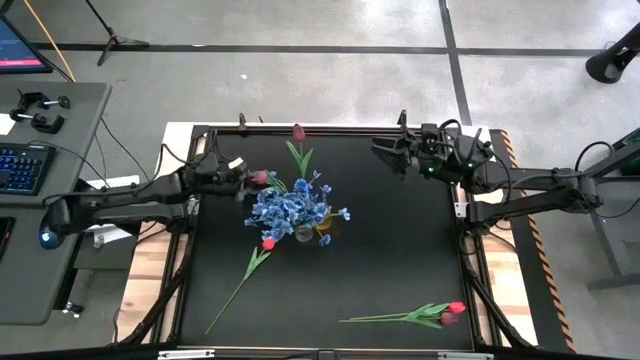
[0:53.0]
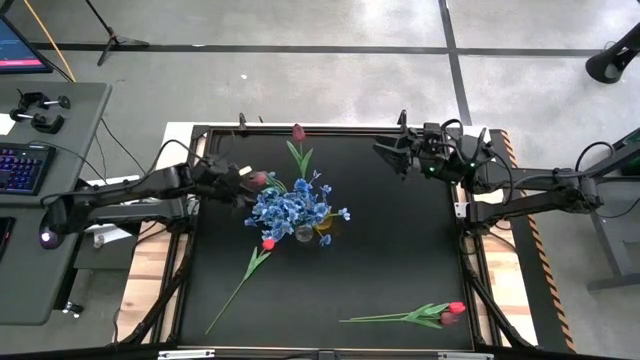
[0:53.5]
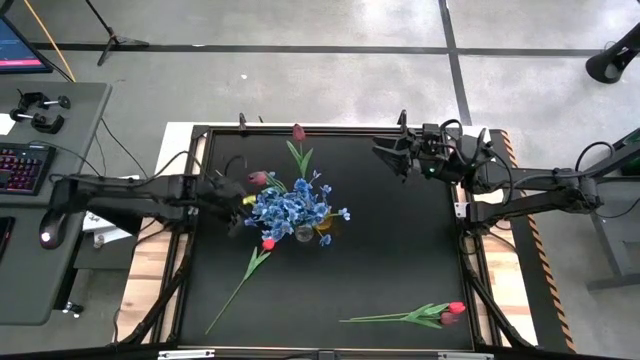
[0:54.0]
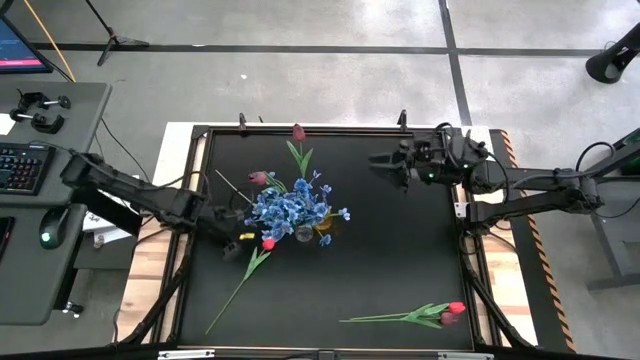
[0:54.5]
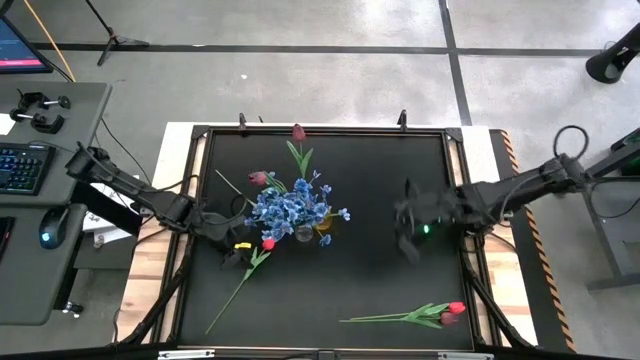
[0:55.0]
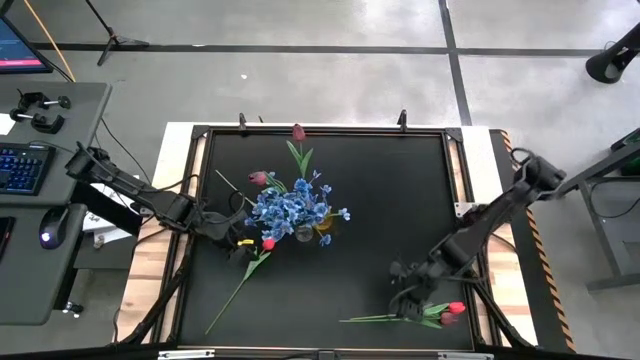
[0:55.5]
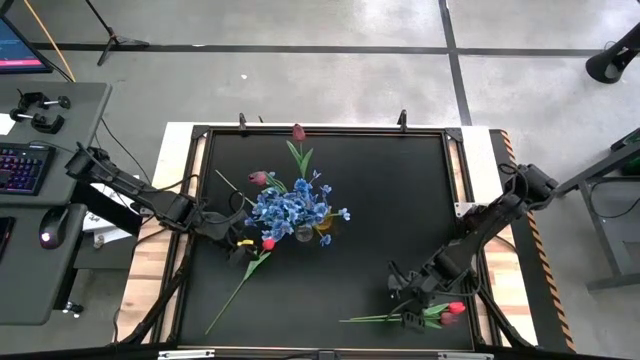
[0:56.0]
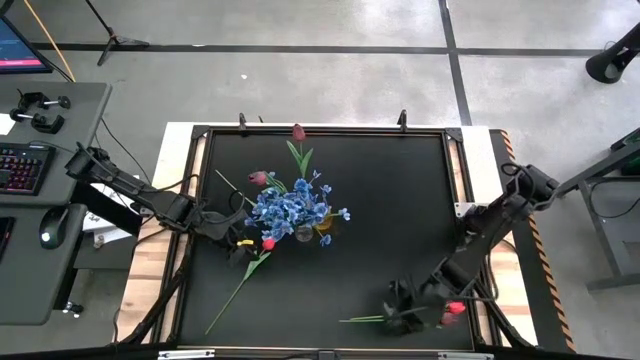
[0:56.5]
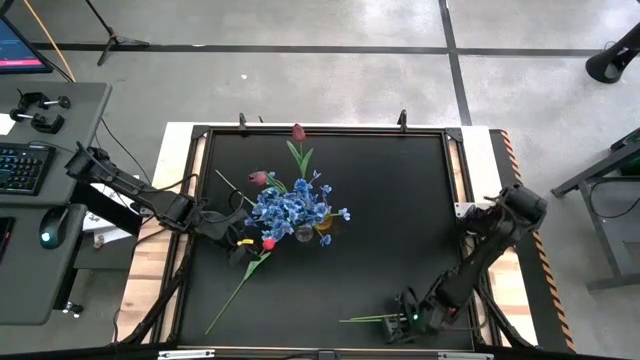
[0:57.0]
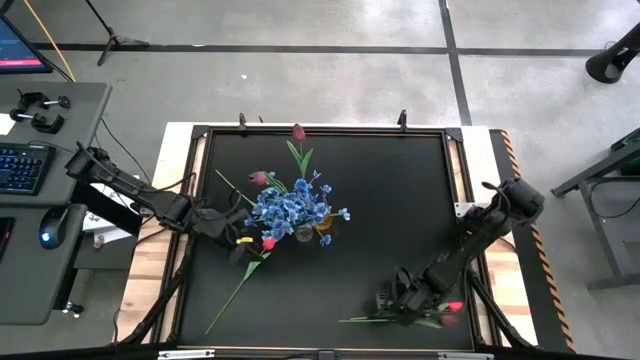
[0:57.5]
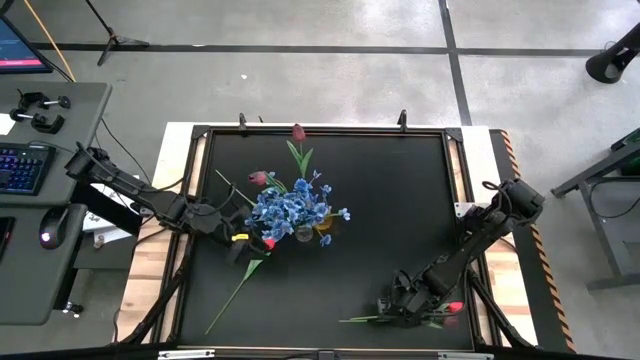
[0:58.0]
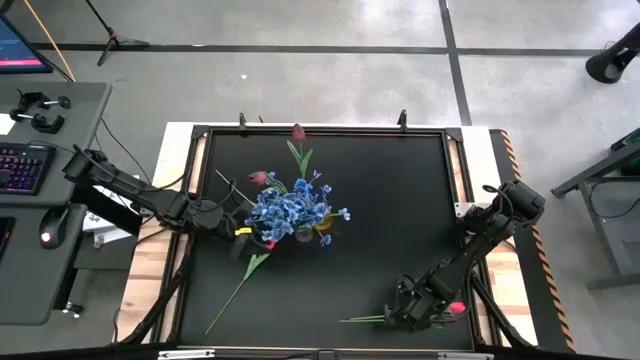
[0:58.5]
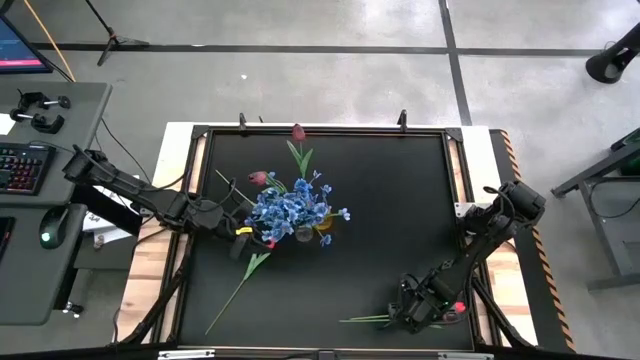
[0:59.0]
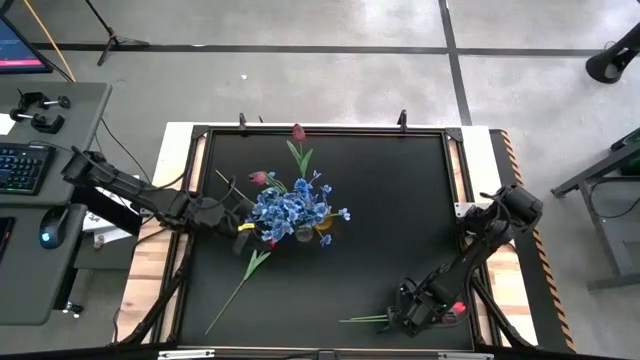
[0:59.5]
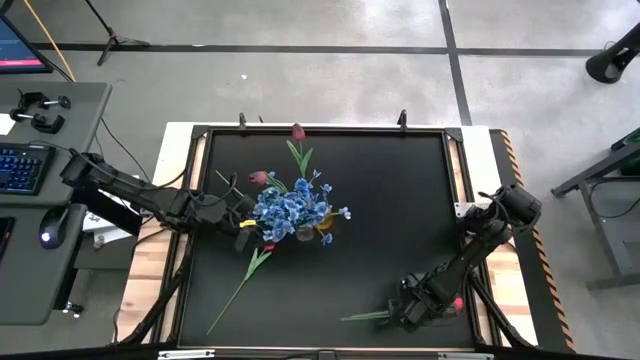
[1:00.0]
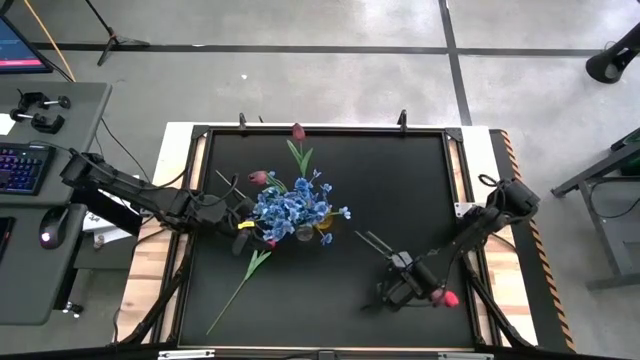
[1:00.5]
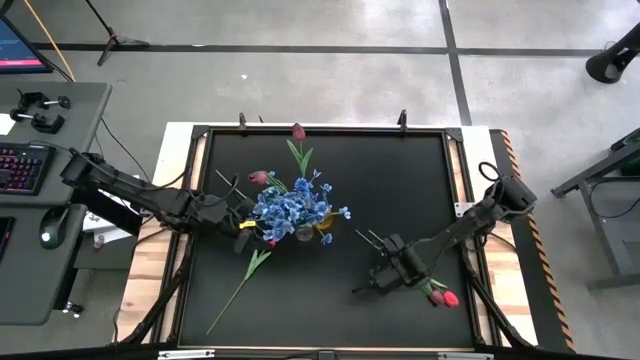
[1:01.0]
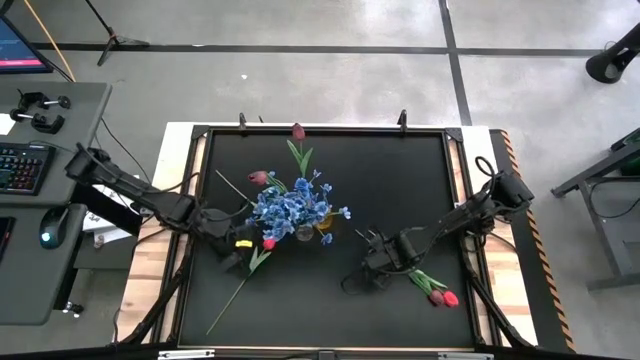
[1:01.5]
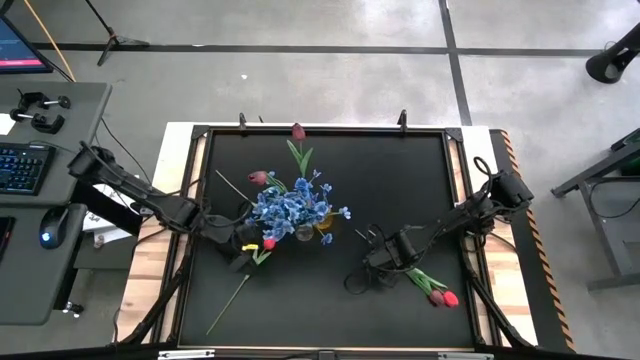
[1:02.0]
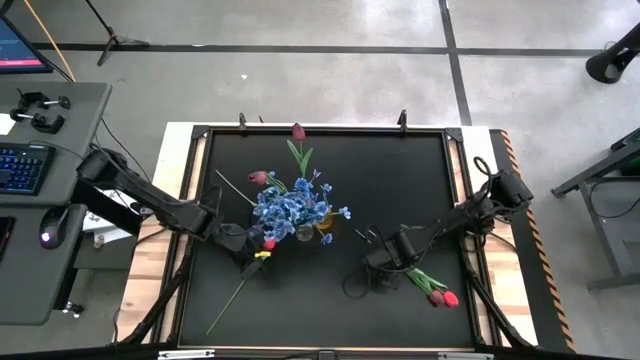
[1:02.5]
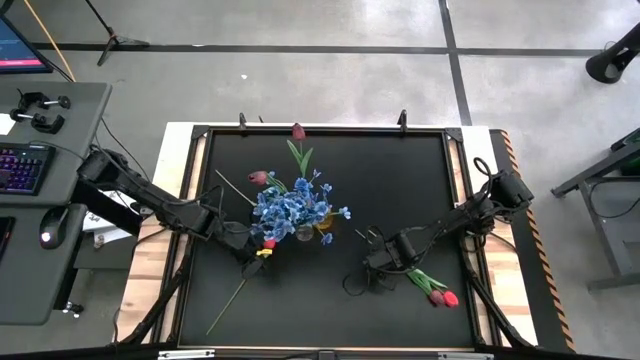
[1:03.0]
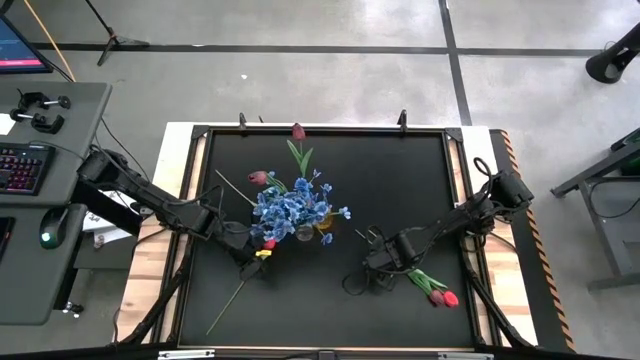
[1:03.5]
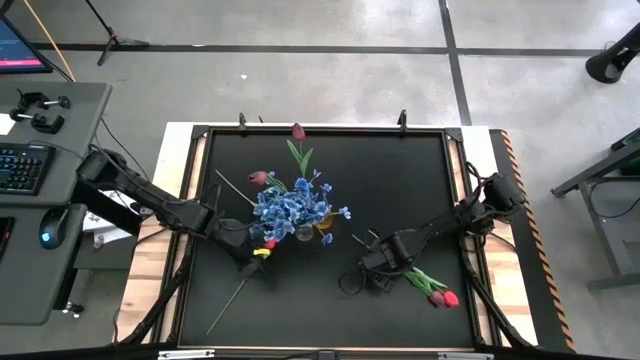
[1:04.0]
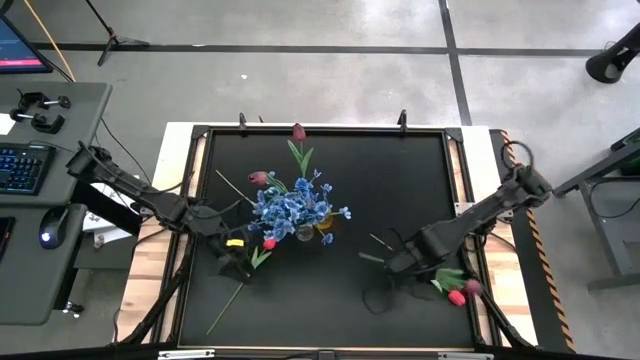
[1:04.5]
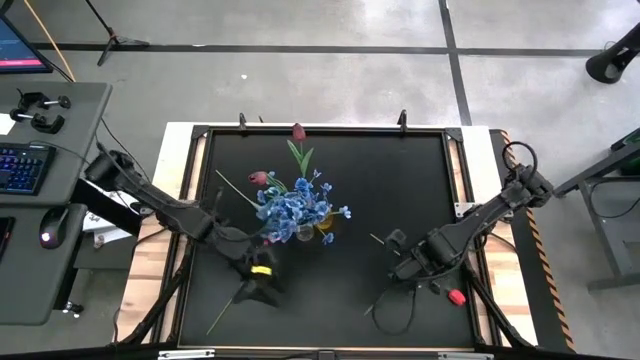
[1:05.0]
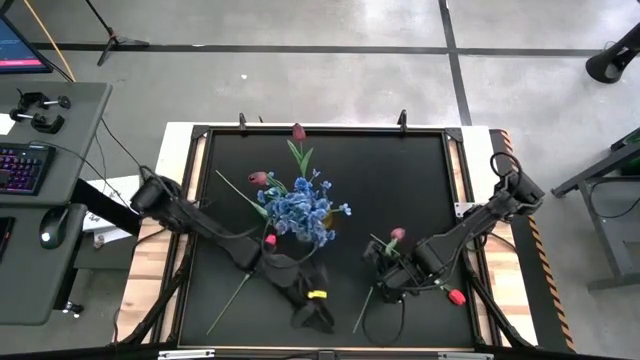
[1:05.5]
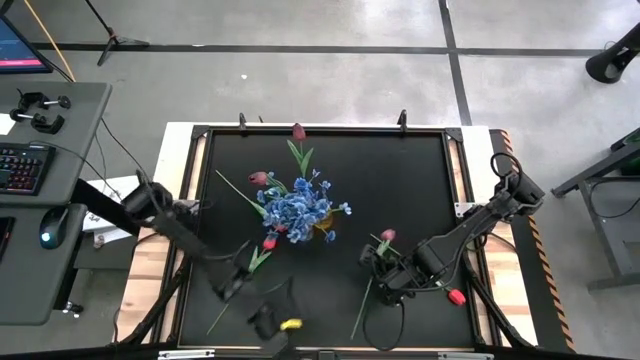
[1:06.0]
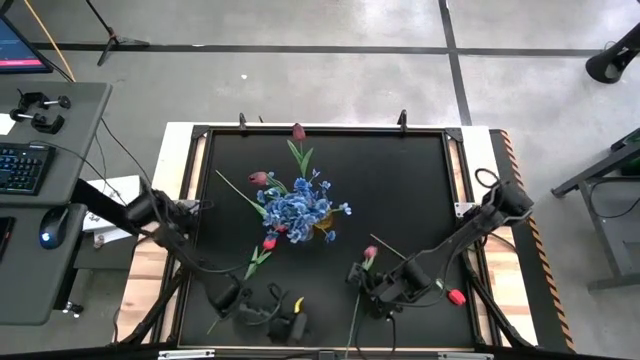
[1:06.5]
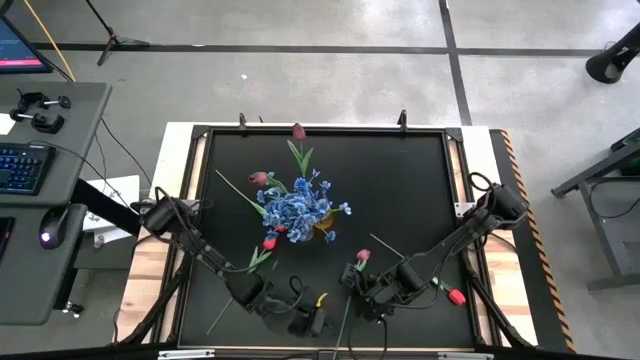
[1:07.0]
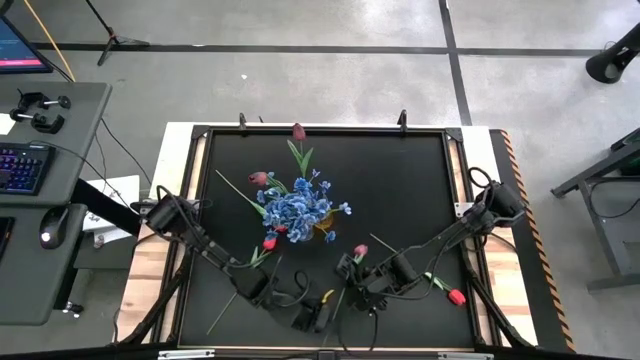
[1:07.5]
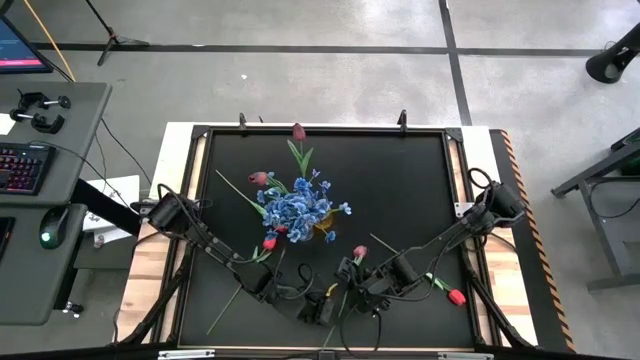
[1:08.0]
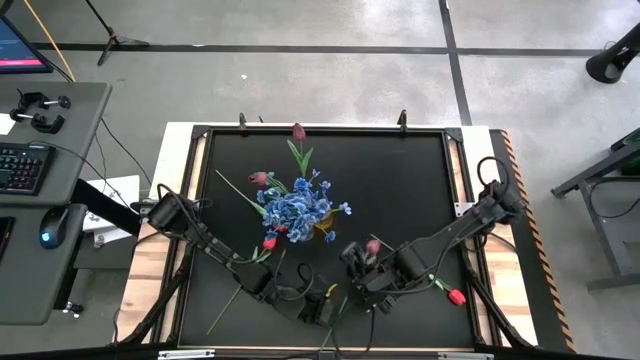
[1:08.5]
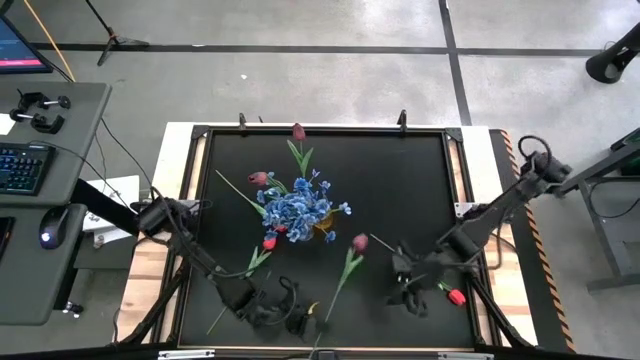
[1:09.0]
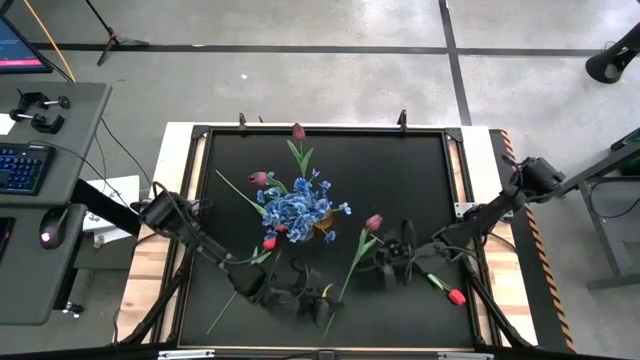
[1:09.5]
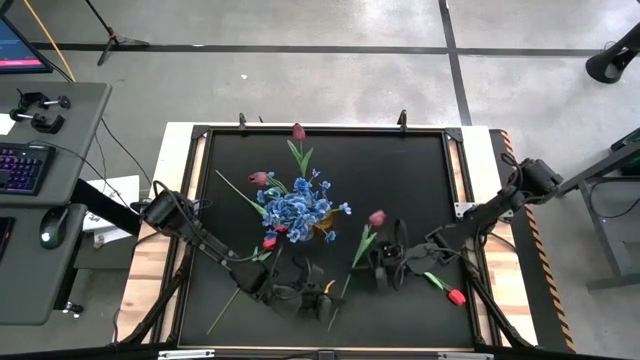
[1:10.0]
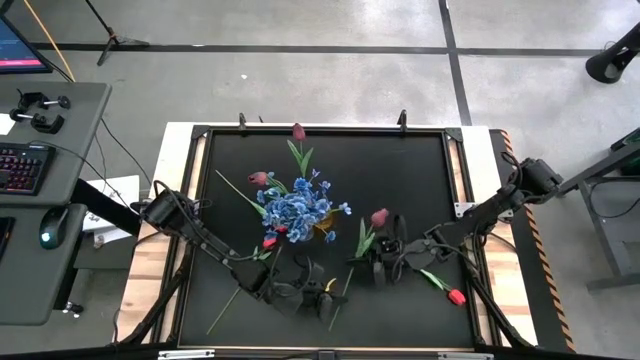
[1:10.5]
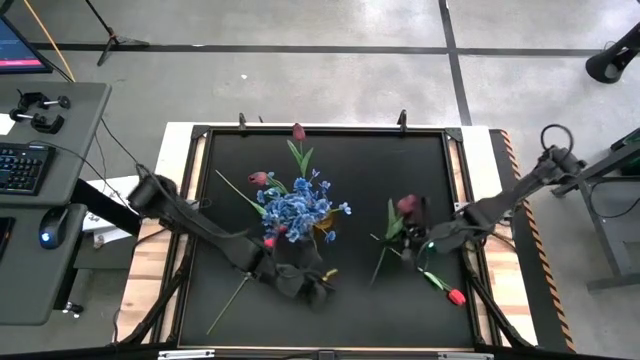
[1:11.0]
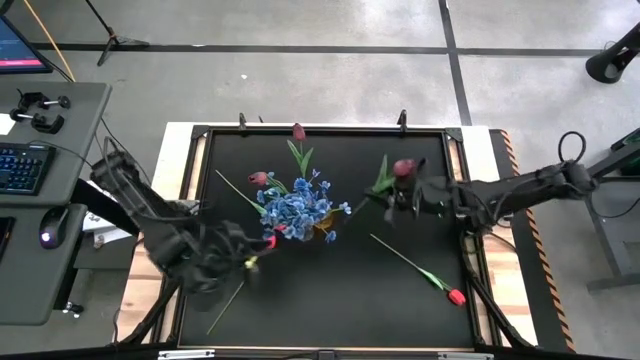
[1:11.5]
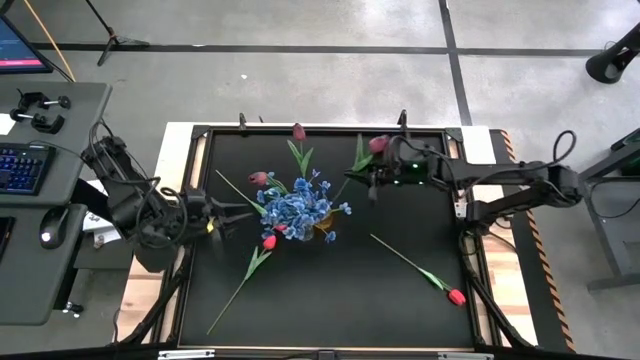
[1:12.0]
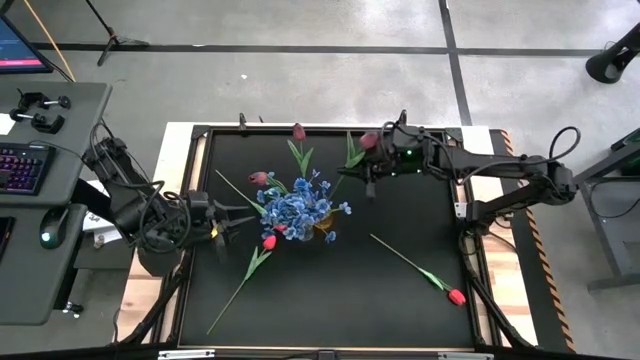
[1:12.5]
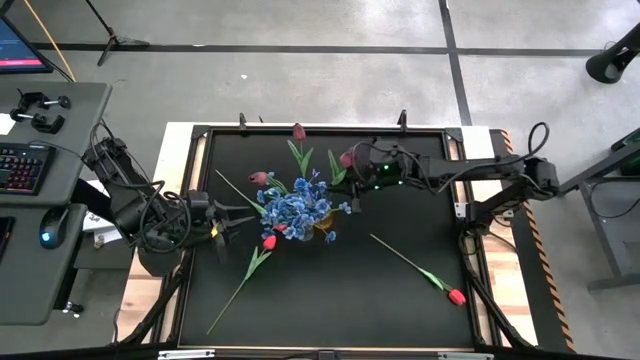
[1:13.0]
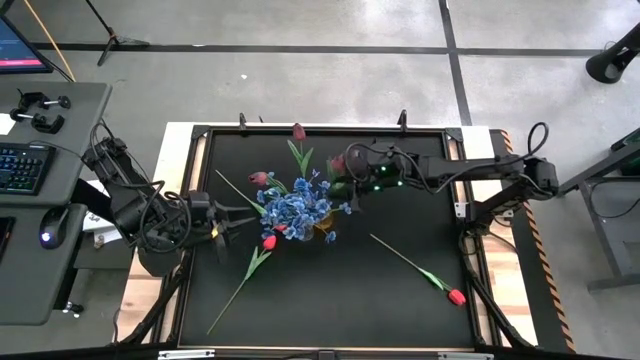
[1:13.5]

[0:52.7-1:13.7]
Task: Sort flowers into vase by color
Put the dark red flower into the pink vase
